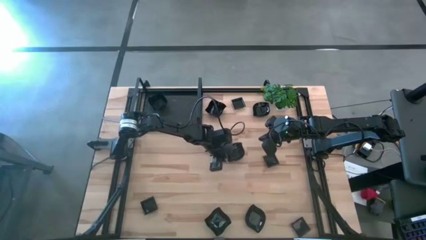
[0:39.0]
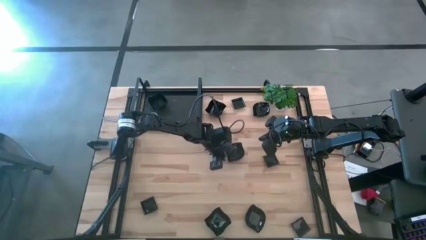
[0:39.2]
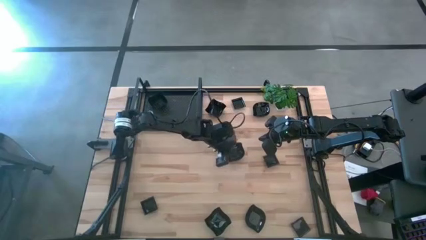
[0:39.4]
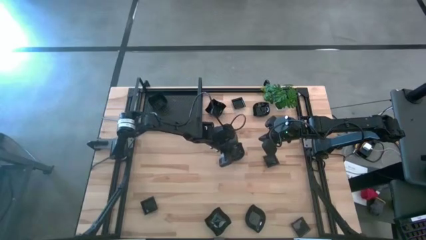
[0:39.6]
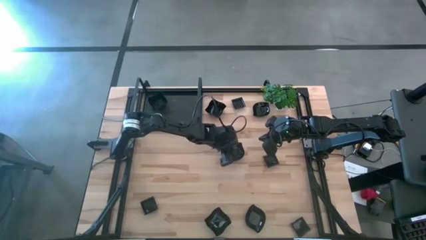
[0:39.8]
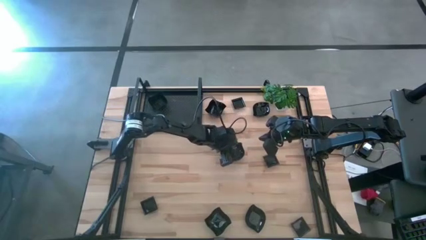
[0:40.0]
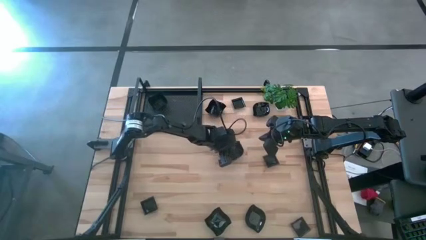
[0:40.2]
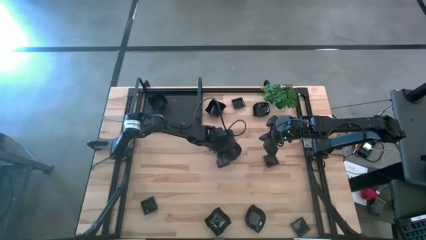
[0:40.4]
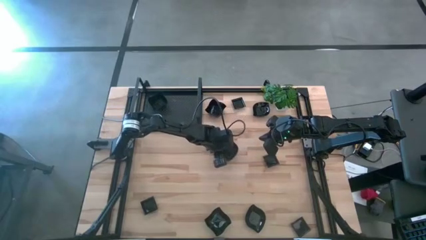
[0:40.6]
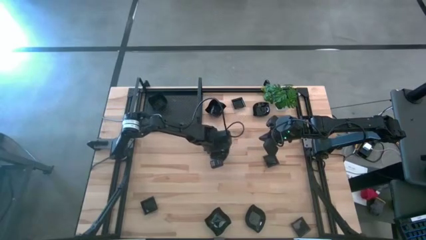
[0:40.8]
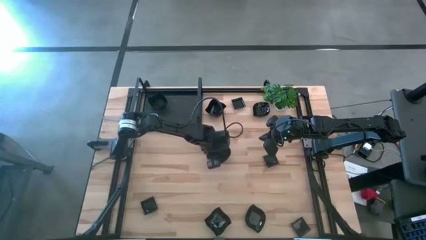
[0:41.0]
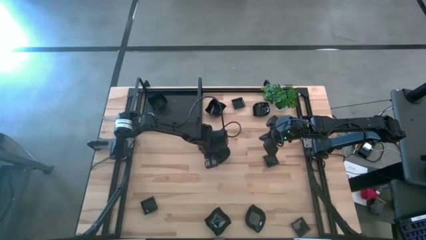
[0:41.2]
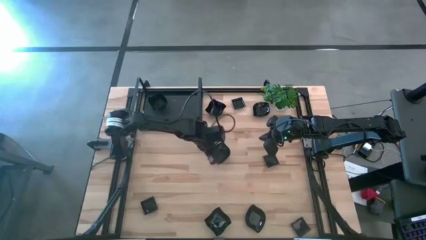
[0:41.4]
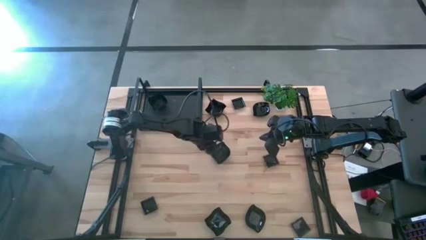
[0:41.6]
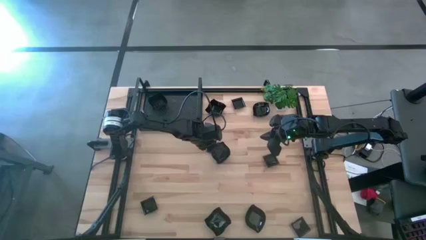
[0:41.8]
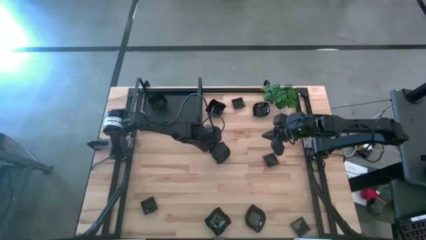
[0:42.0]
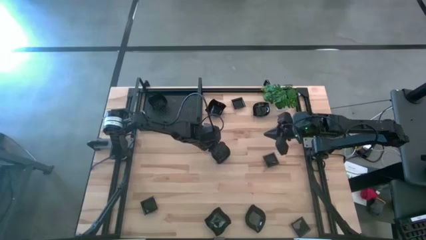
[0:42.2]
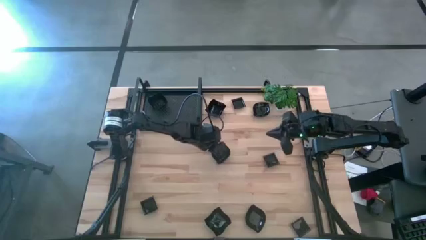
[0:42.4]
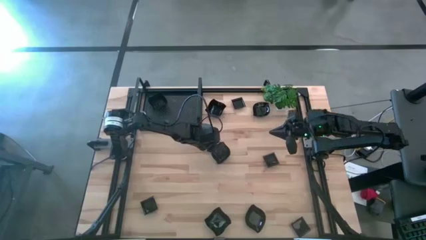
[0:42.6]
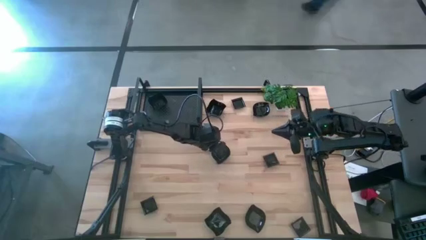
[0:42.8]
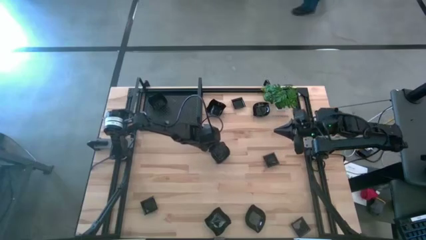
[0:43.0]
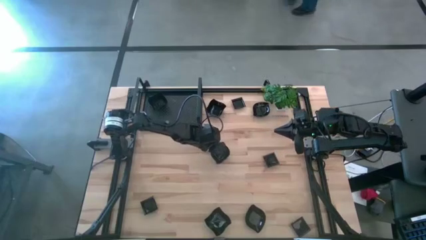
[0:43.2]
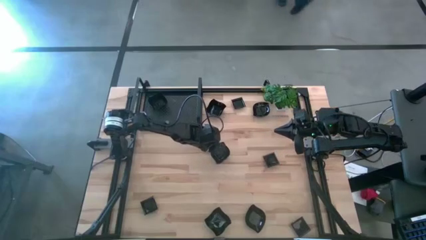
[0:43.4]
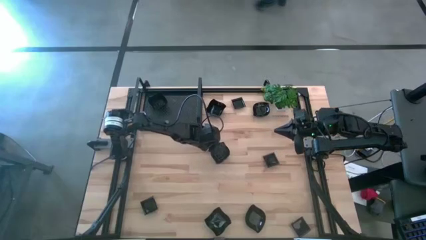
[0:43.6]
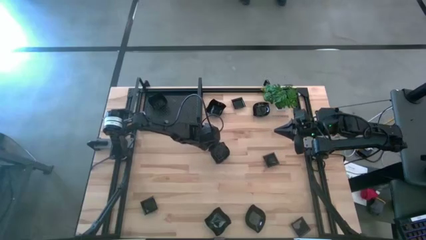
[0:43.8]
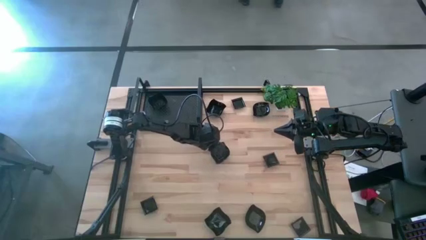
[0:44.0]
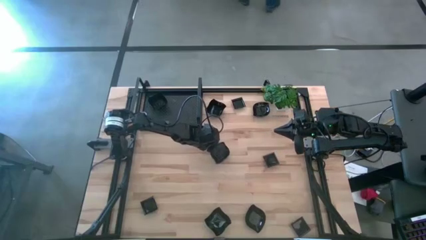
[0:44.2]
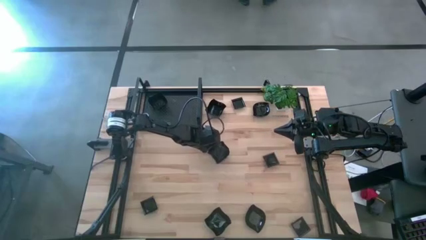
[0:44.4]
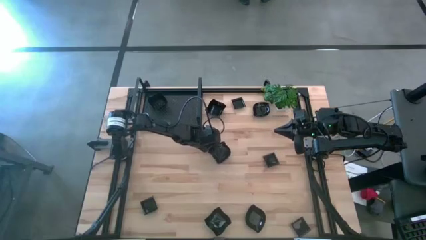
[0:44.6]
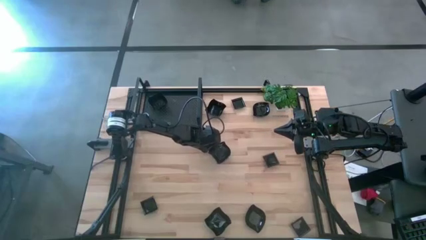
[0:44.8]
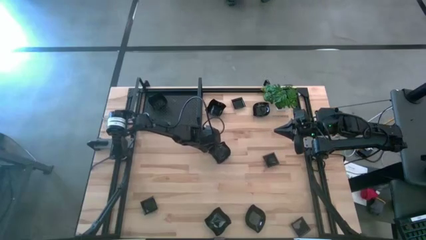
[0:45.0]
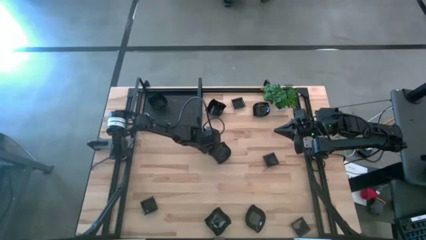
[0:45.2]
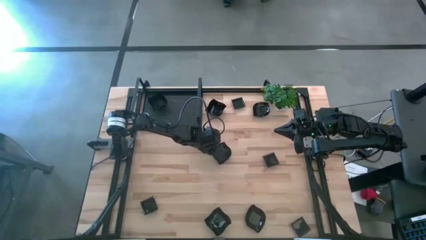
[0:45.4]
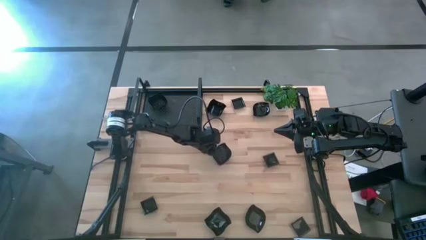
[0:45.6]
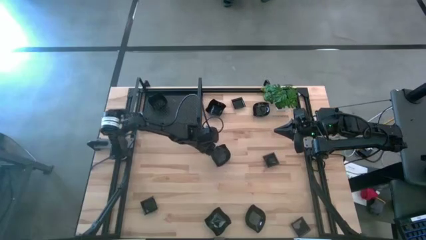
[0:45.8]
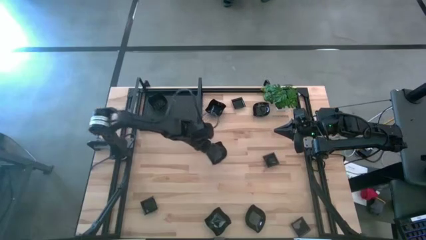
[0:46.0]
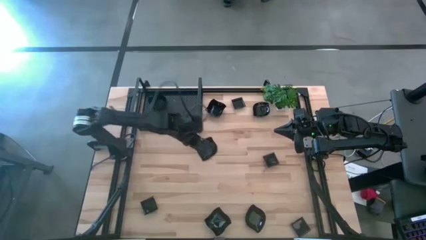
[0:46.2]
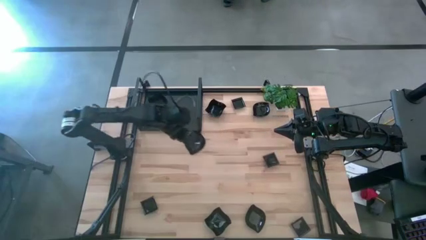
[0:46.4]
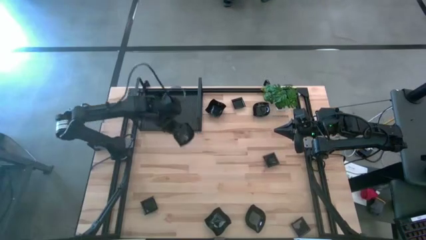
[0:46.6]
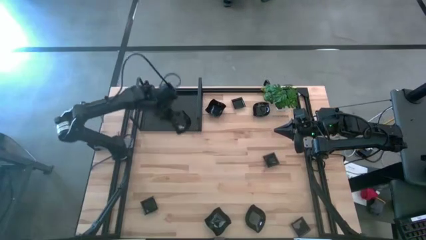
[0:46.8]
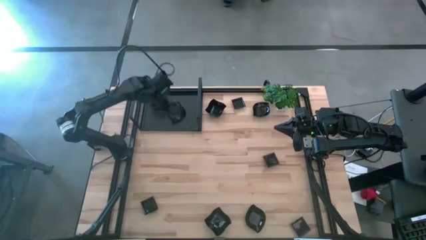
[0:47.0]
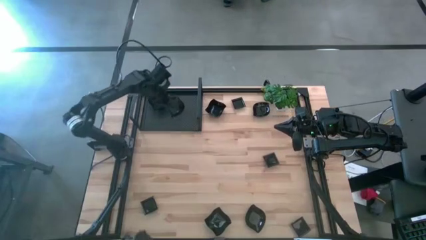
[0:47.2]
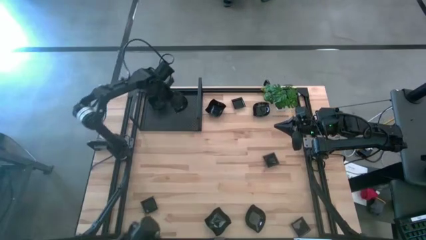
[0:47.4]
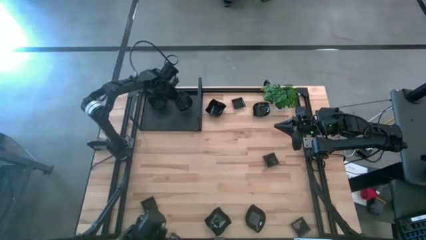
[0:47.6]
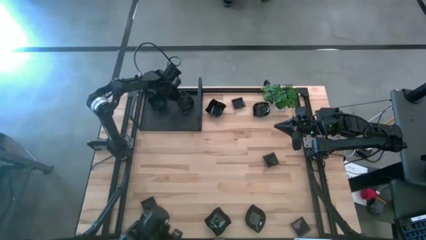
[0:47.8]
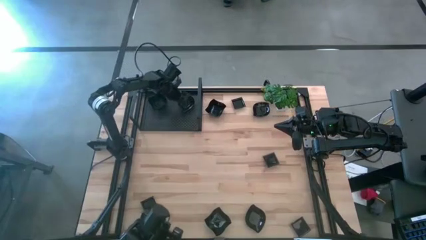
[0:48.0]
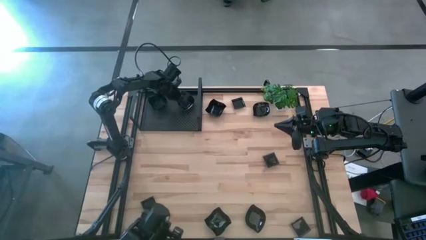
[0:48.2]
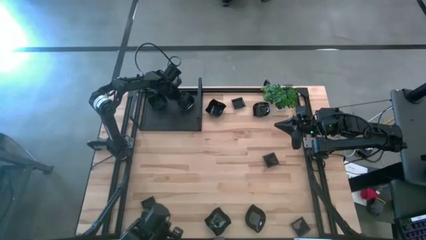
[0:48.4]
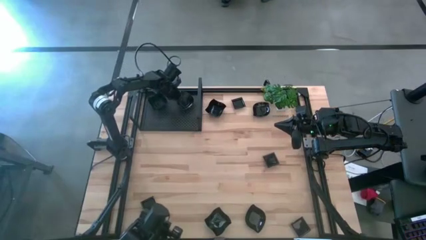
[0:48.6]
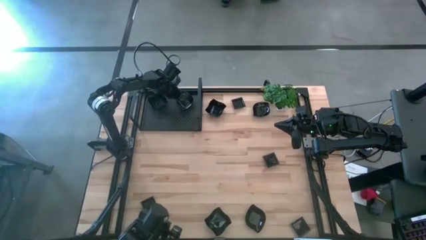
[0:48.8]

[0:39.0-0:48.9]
Task: Pick & Place Mini shaped plates
Put the stacked black leaf shaped plates on the shelf

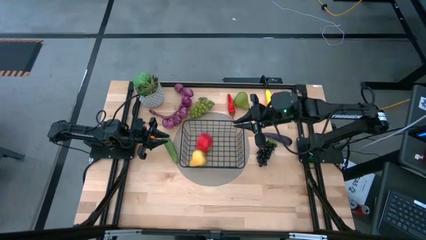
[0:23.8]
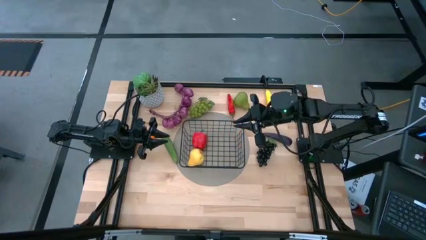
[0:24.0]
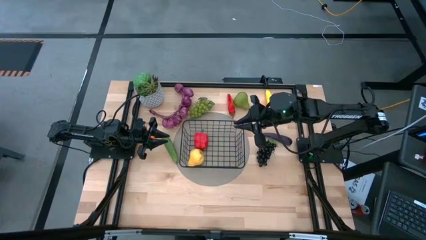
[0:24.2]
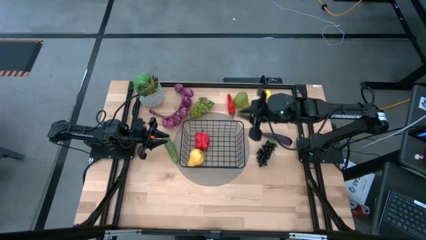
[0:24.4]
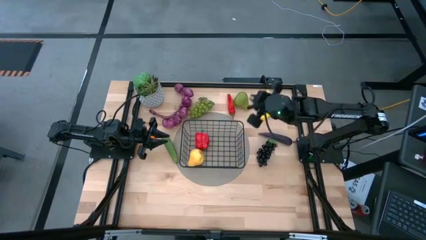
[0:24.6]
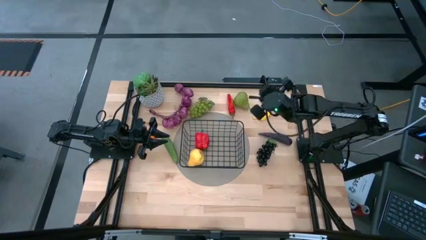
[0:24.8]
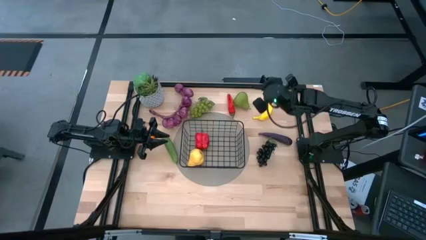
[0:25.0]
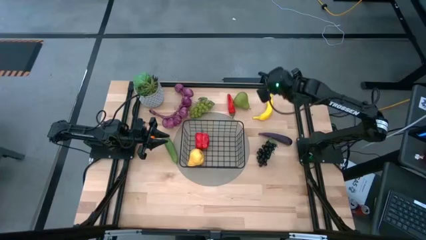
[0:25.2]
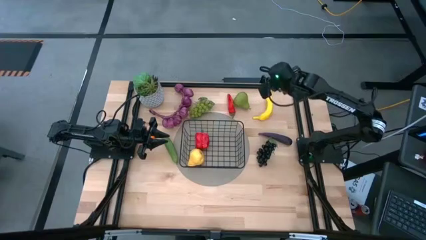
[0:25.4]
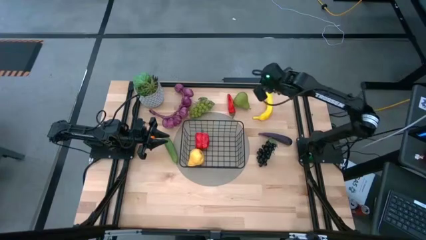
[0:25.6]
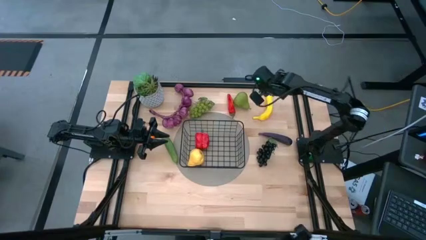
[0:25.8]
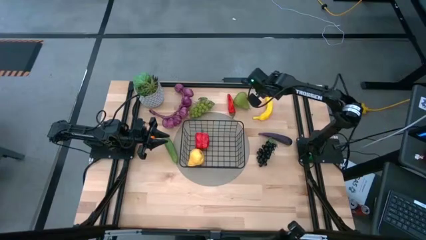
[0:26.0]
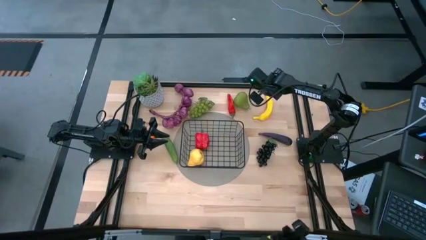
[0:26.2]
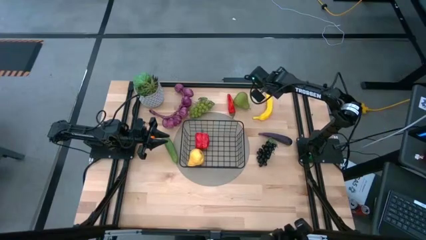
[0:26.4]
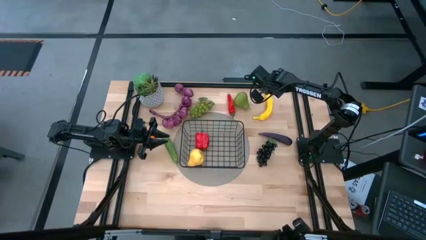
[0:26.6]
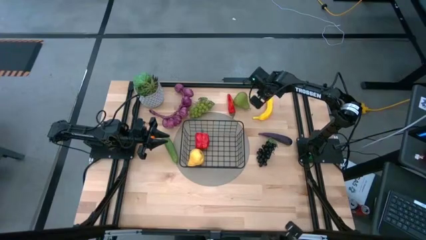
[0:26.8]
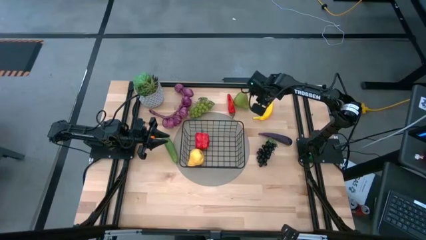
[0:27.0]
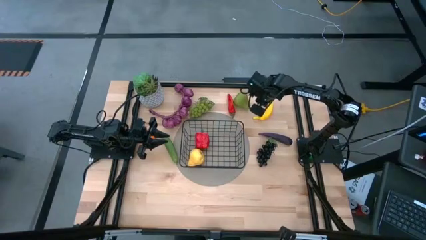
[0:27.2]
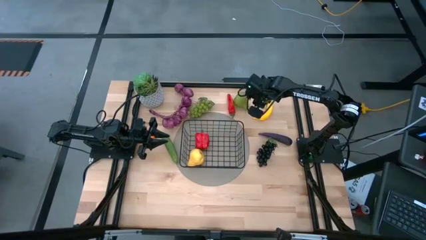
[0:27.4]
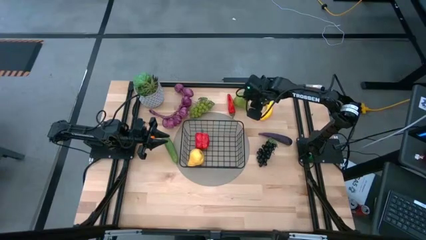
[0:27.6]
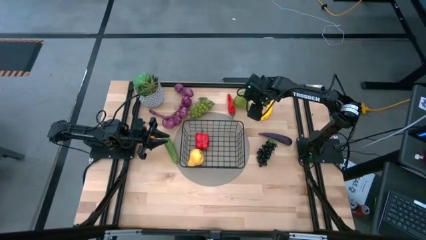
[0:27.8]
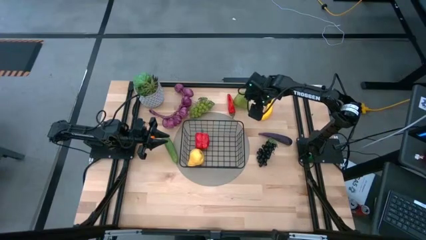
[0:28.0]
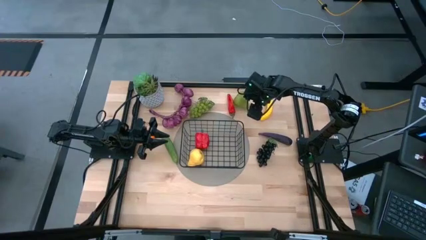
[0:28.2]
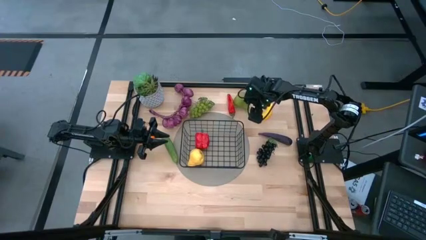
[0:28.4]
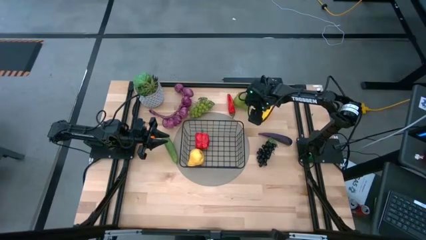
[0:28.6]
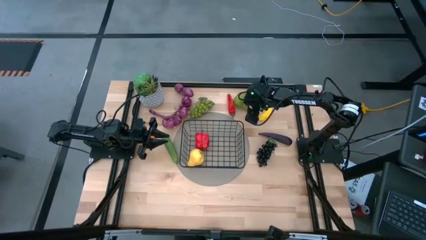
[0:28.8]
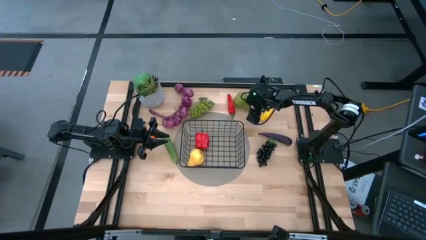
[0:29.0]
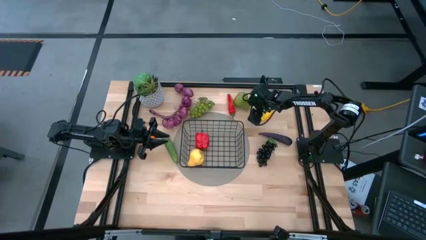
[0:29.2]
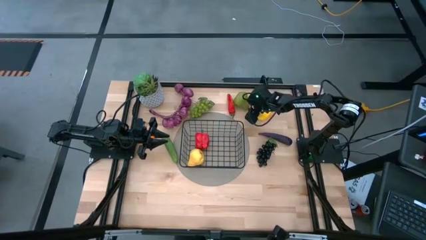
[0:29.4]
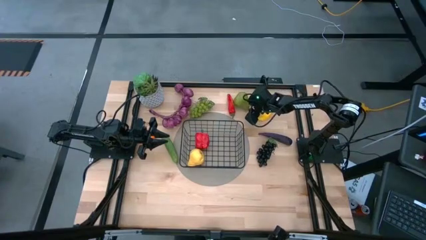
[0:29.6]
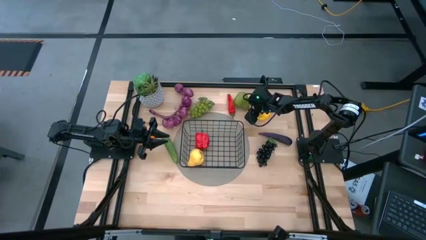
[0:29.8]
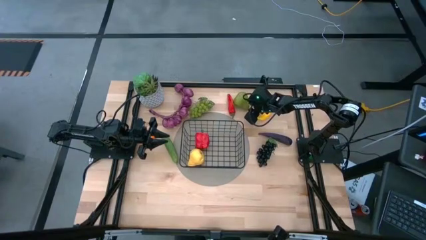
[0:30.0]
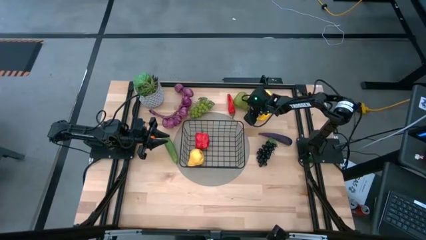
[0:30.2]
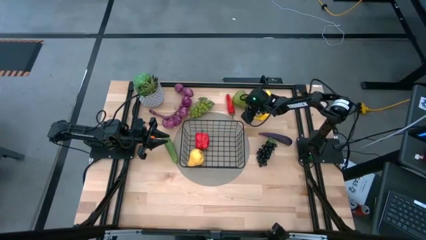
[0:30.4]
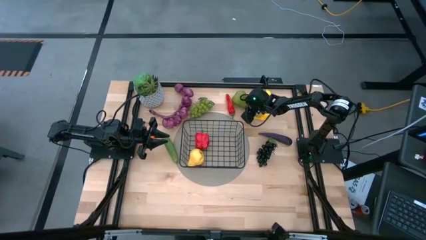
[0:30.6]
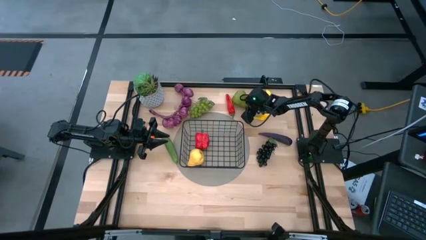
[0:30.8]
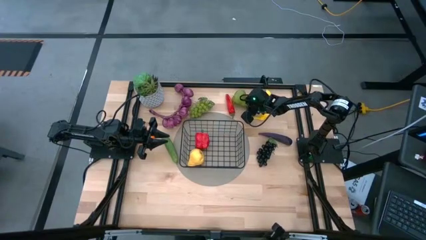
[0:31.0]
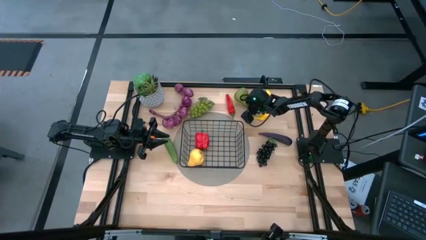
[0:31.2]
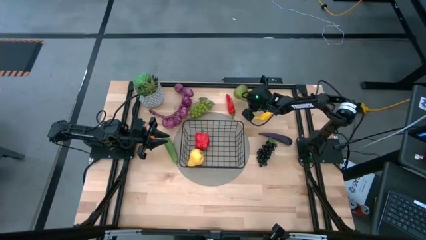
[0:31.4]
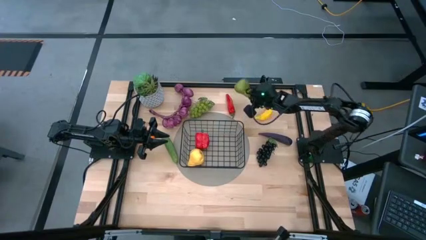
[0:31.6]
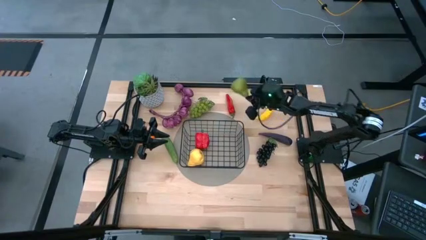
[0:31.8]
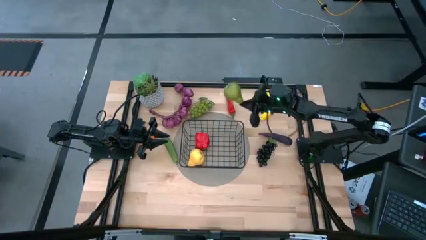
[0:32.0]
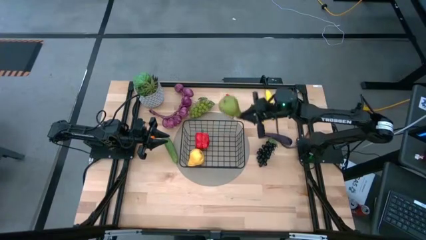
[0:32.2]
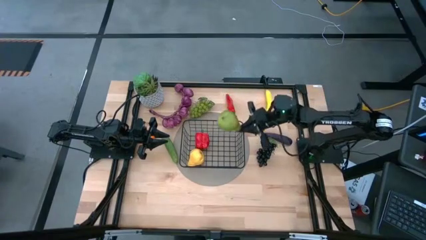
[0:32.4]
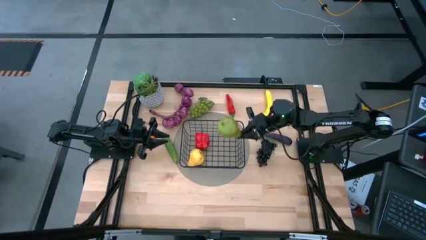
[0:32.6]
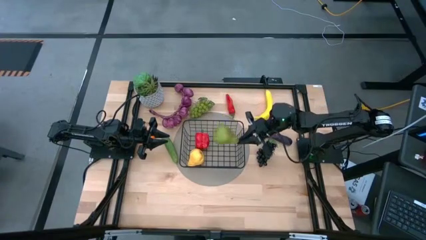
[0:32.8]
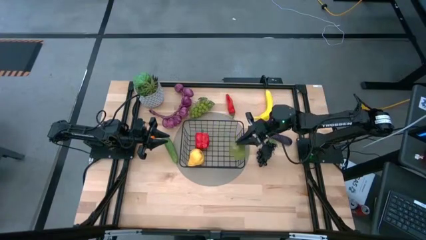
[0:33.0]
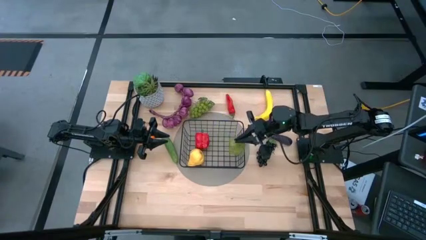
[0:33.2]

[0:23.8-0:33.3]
Task: Build produce basket
Put the green pear into the black wire basket
